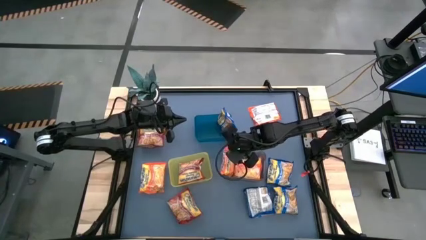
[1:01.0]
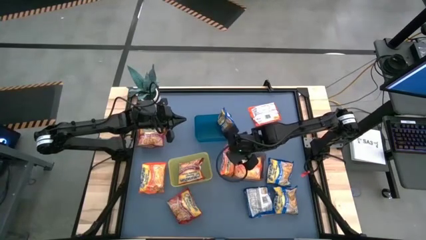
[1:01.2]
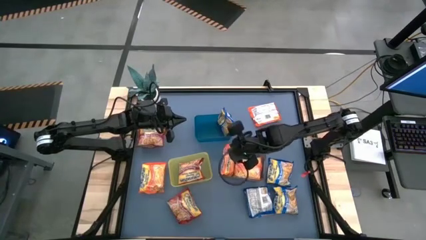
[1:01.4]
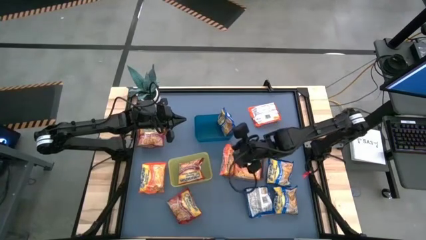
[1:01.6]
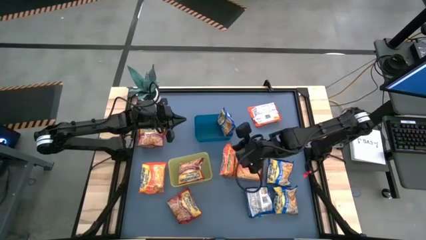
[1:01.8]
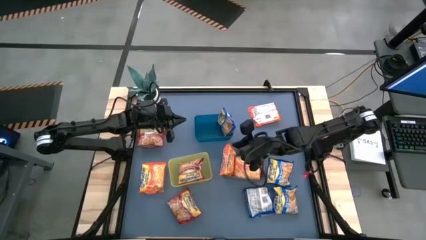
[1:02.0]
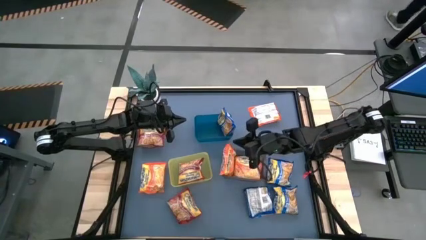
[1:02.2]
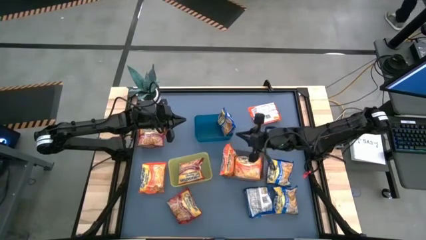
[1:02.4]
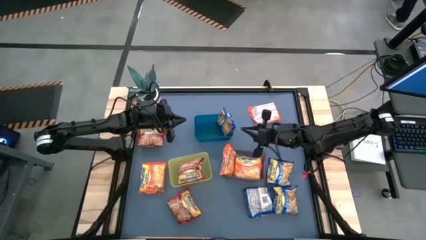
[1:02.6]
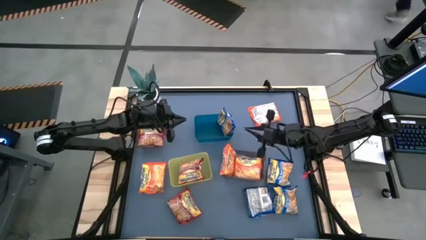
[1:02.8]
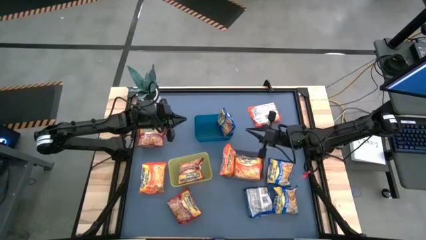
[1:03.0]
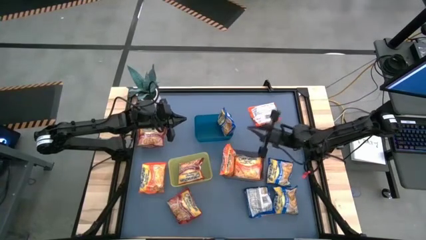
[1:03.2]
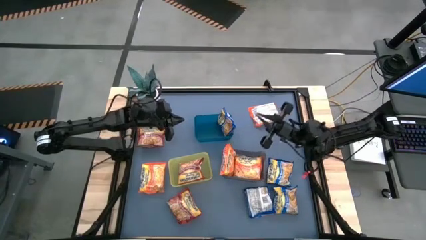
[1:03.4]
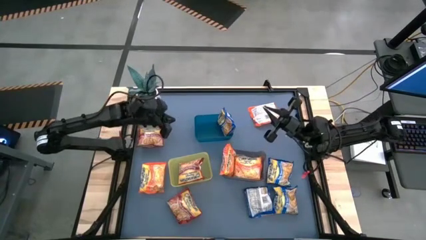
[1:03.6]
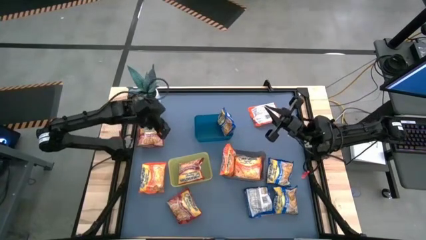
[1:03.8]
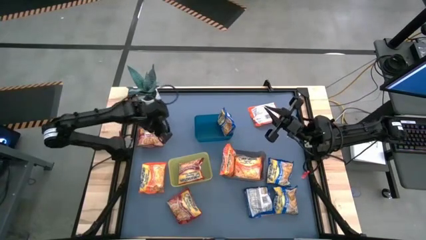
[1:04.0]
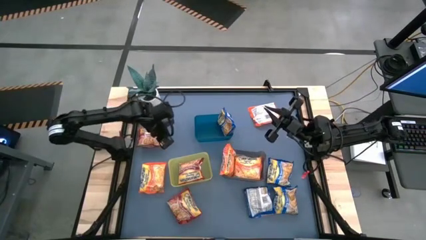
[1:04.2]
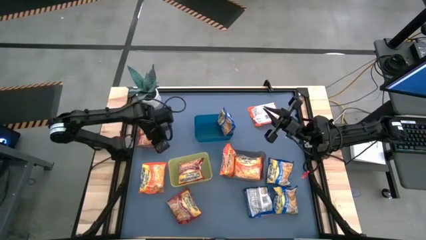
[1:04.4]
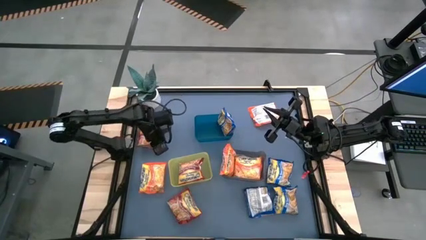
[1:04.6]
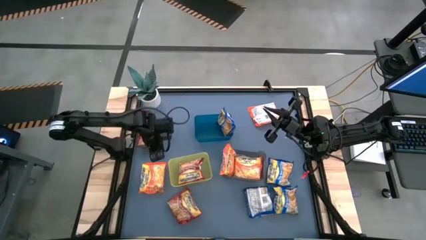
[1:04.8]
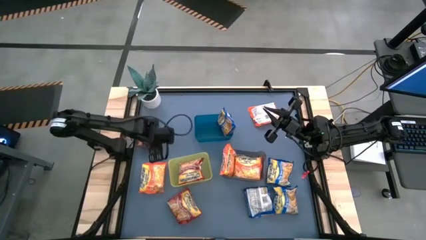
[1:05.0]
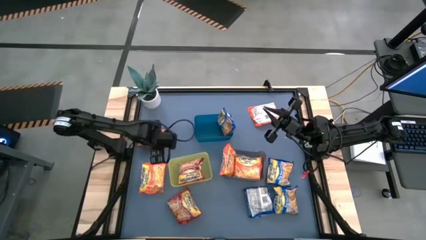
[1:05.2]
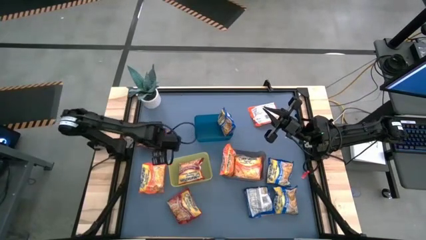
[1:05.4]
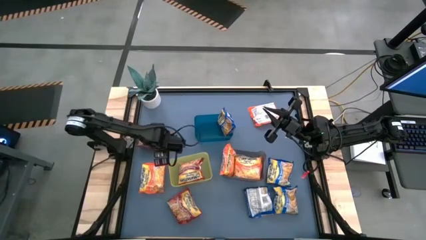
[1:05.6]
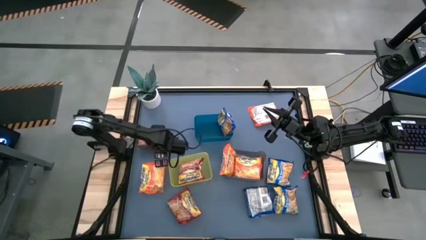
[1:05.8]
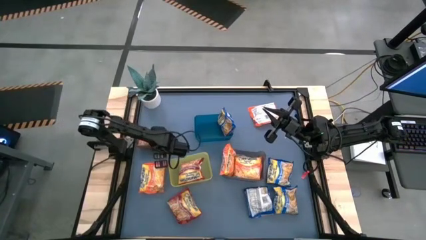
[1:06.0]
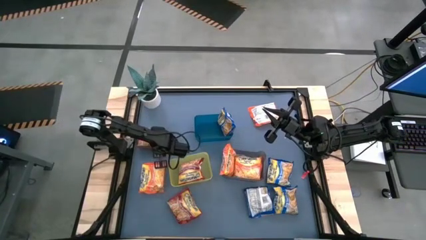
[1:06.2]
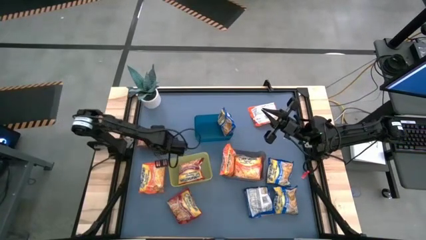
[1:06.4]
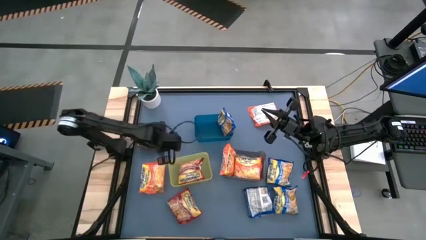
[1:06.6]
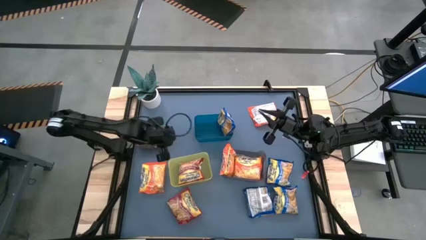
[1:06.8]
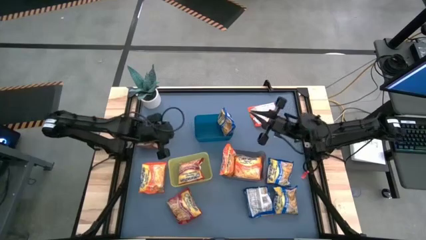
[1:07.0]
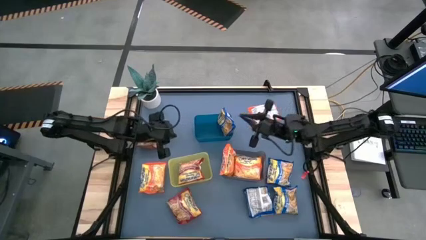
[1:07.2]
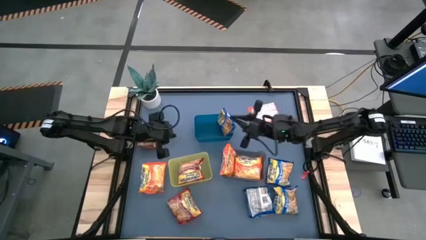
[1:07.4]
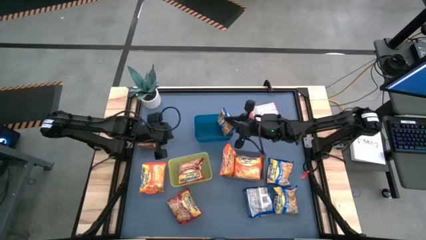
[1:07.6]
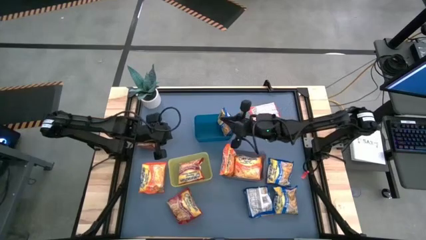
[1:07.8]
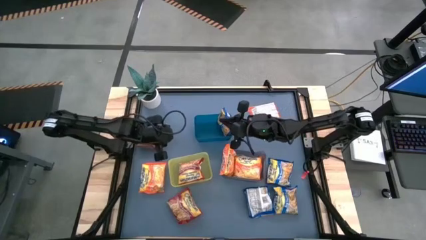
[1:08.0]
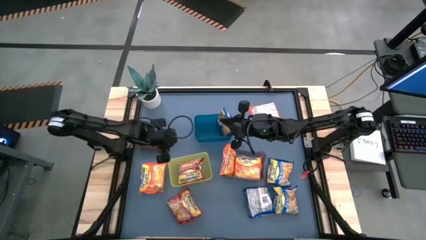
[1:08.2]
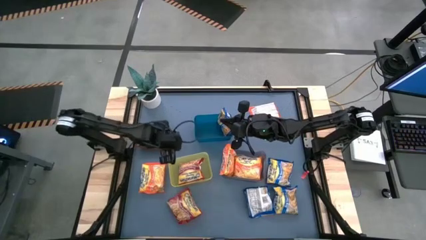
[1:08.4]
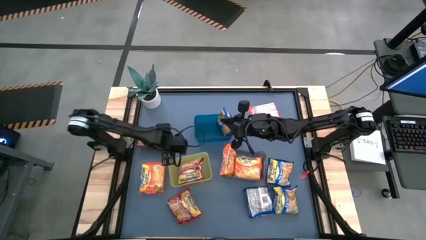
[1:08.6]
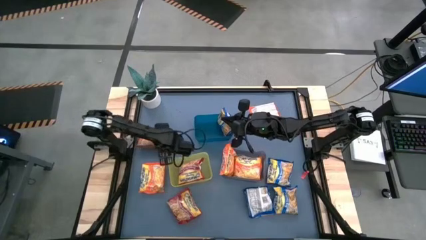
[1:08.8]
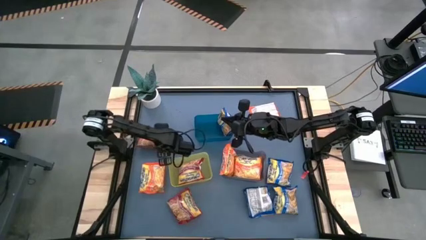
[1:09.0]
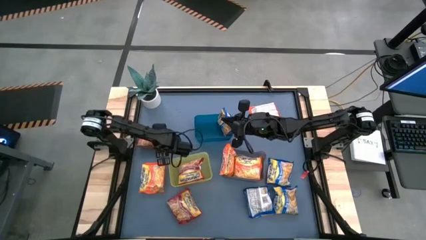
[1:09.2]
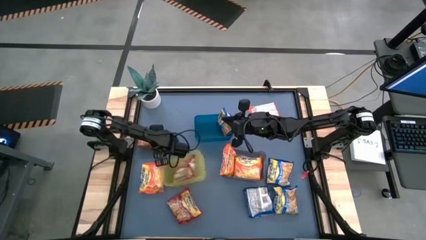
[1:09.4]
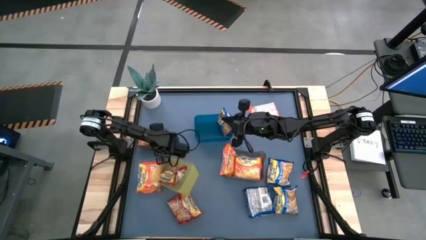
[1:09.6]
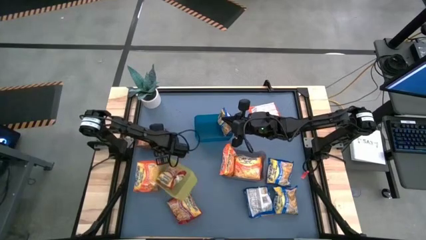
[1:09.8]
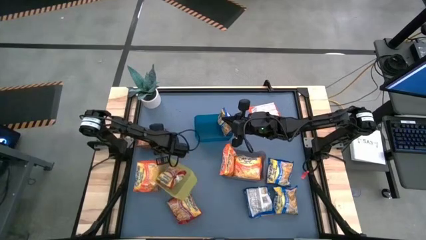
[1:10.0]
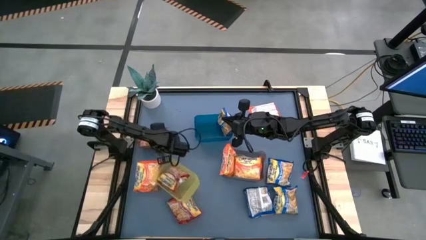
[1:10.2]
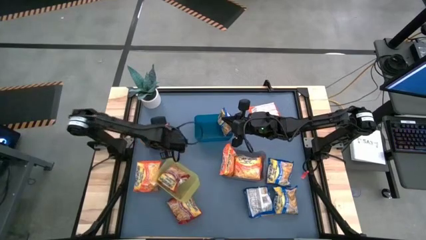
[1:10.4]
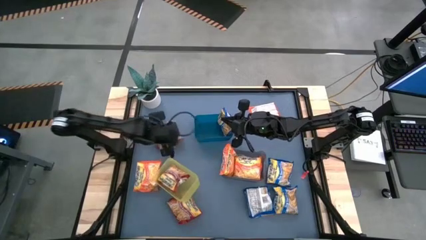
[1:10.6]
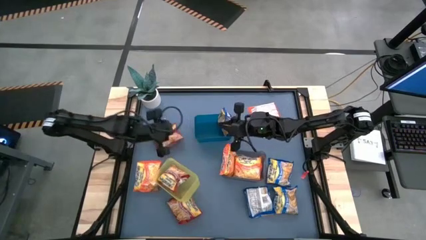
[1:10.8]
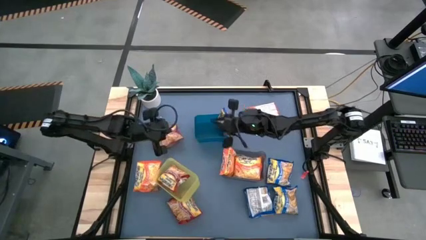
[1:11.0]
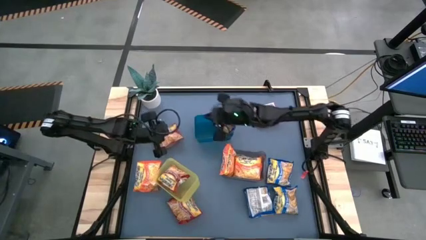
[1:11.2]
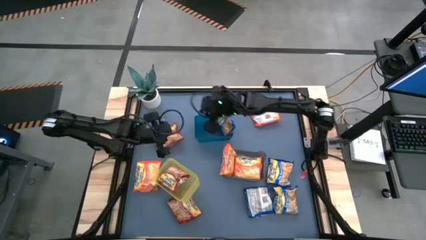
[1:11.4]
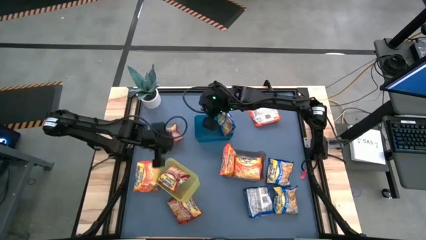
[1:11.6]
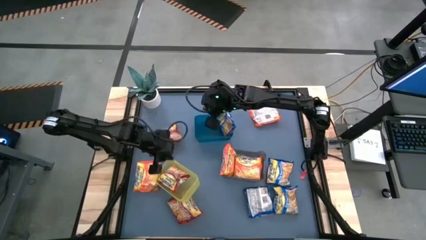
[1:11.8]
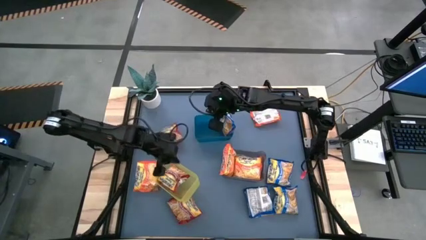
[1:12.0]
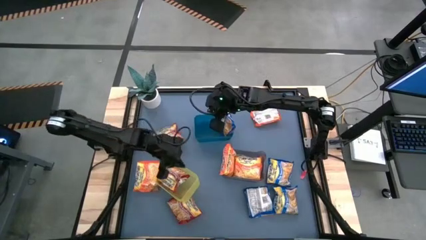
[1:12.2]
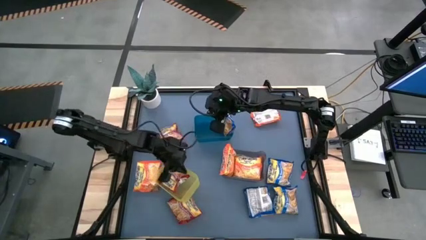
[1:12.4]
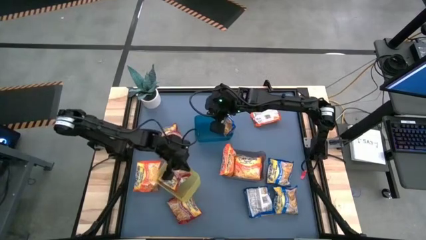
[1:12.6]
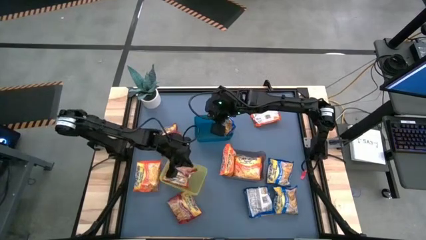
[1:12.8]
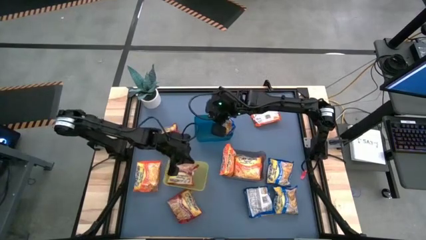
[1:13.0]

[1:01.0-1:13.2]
Task: Sort Maruchan noodles
Put the red noodle pack into the yellow bin
